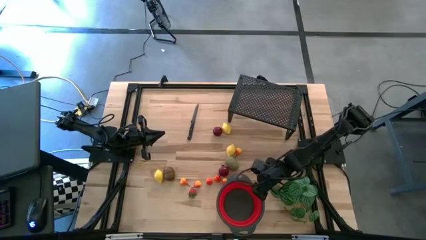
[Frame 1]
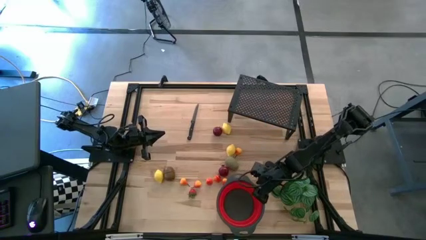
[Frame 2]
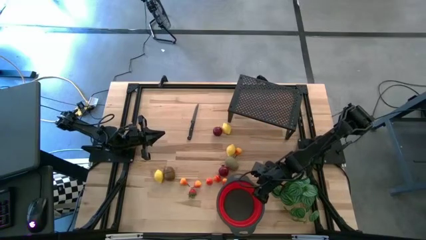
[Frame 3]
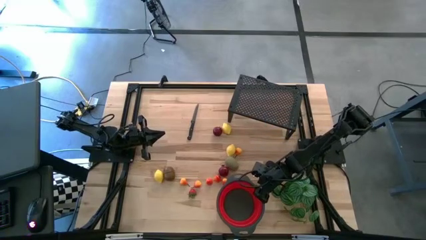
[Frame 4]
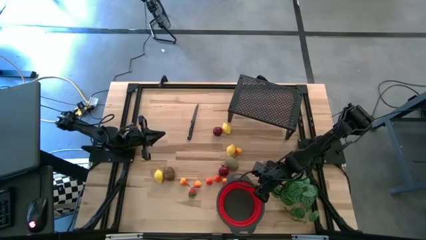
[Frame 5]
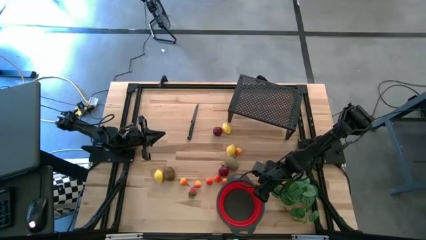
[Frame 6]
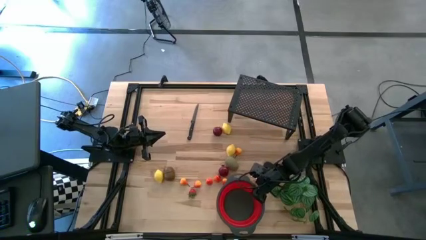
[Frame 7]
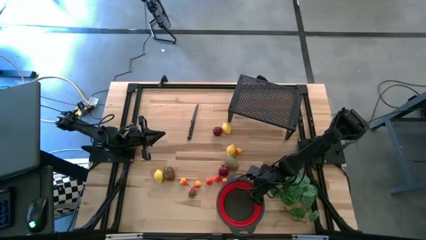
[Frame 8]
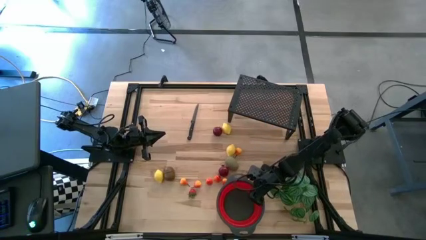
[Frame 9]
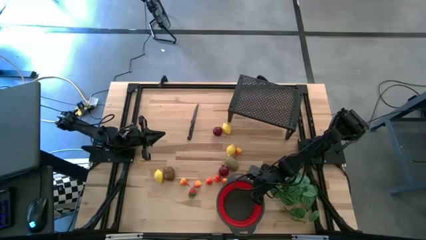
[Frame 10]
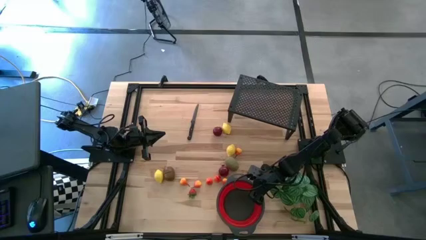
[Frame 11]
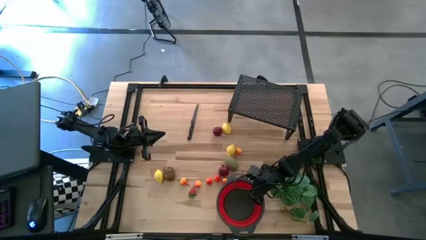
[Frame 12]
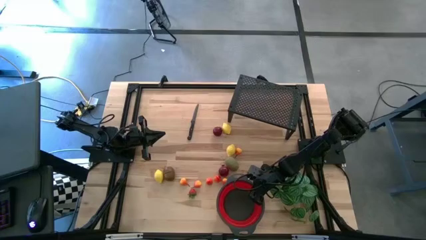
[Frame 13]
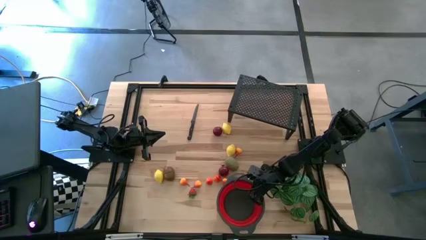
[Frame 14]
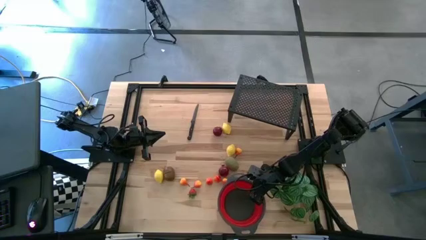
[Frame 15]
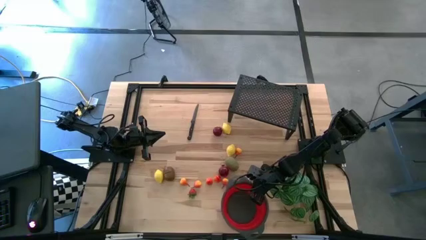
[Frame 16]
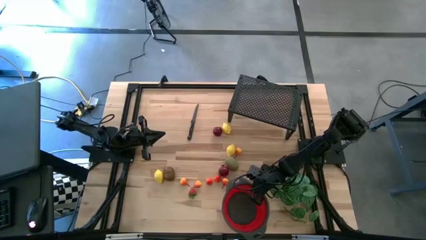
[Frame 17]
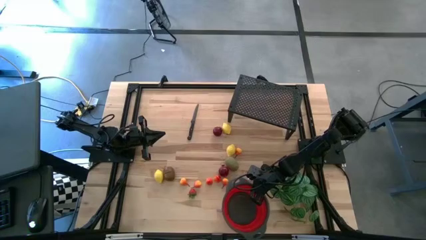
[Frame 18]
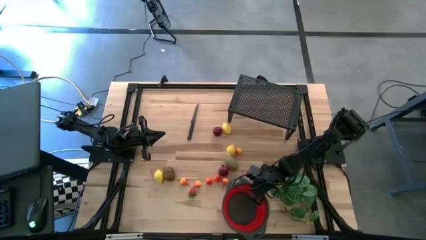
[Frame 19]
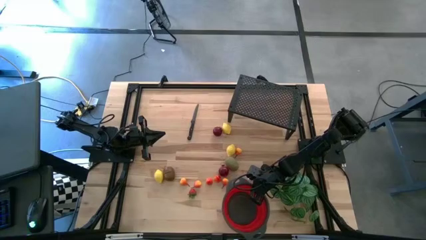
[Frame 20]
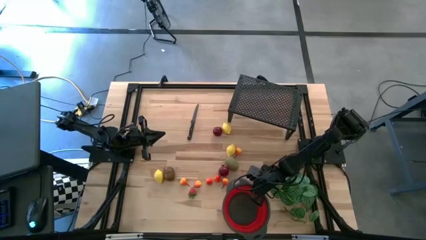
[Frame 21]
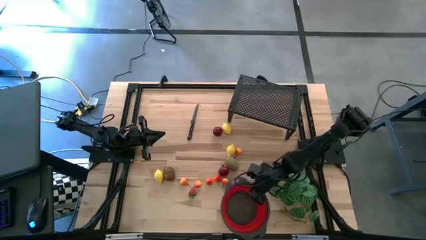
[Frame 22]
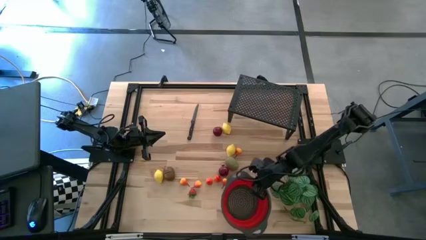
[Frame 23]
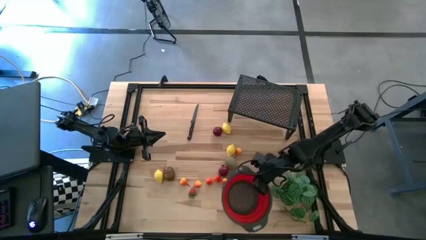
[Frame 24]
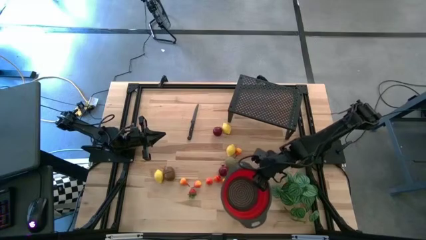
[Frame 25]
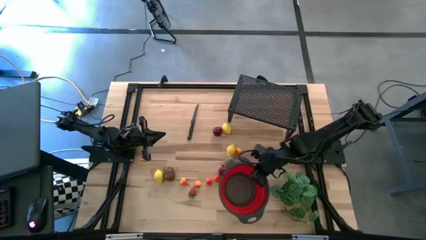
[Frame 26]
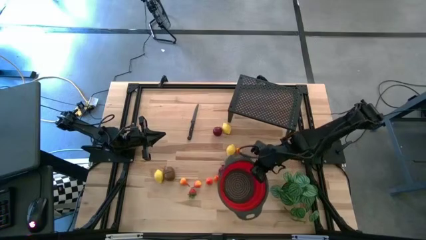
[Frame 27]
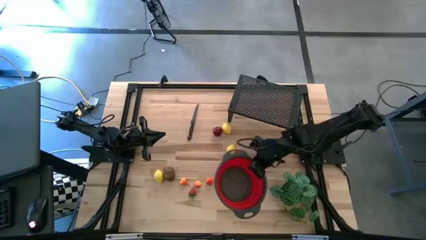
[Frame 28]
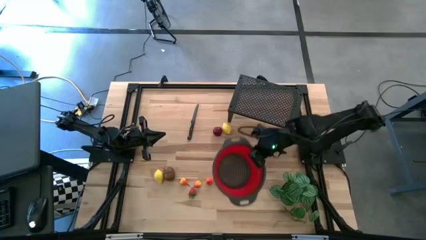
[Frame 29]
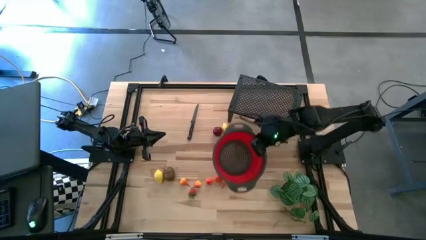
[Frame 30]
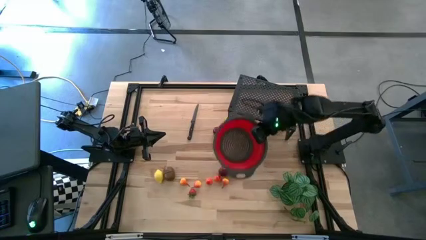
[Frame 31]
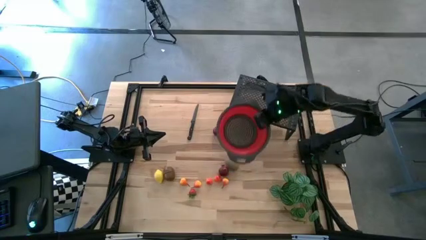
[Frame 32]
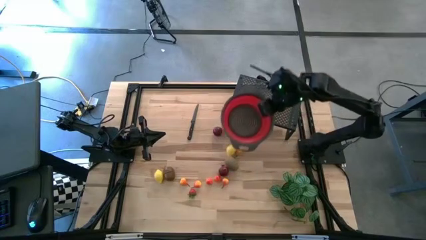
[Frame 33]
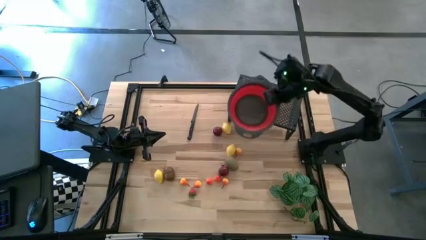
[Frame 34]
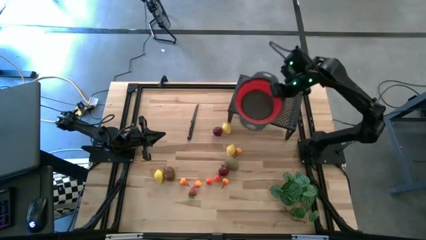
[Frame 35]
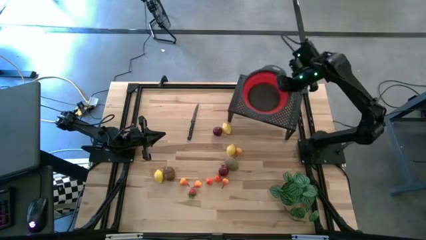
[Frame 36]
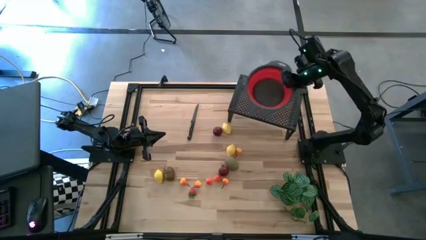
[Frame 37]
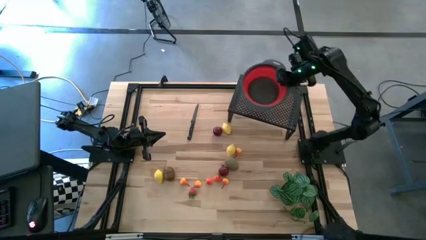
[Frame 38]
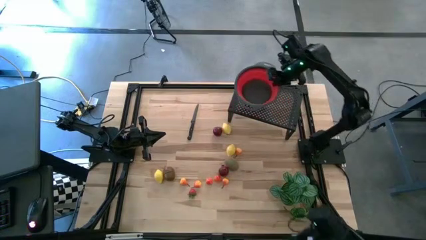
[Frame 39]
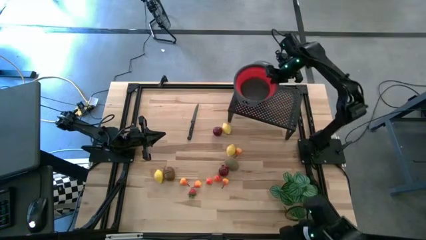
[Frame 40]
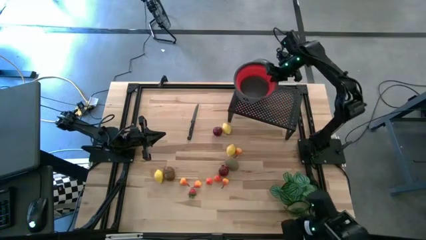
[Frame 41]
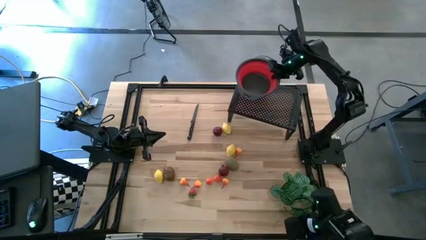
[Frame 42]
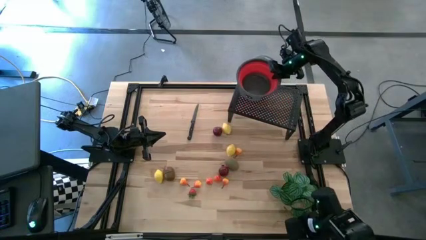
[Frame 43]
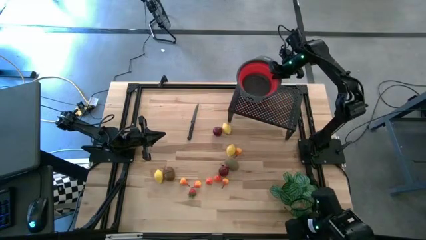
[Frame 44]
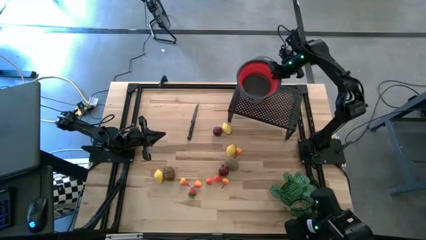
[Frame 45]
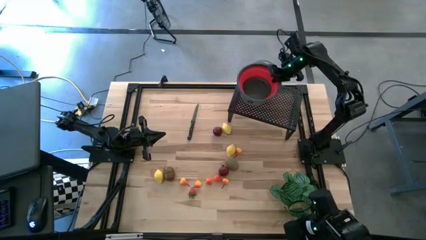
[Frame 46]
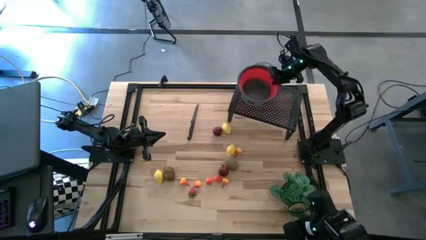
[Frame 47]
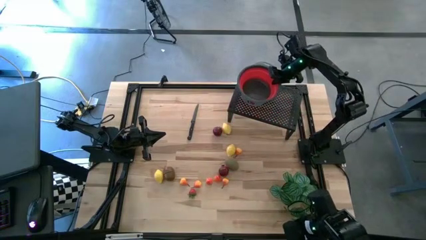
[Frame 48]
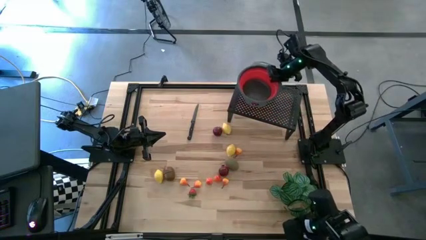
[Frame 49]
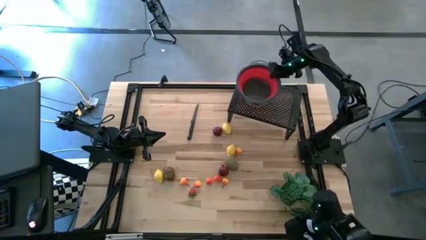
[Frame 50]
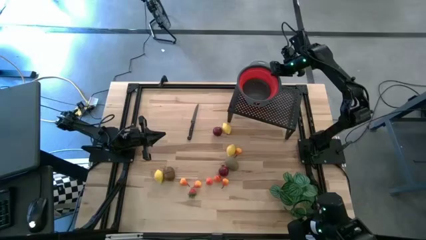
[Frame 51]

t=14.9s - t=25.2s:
Task: Pick & Place Fruit
Put the red strainer bowl on the shelf
